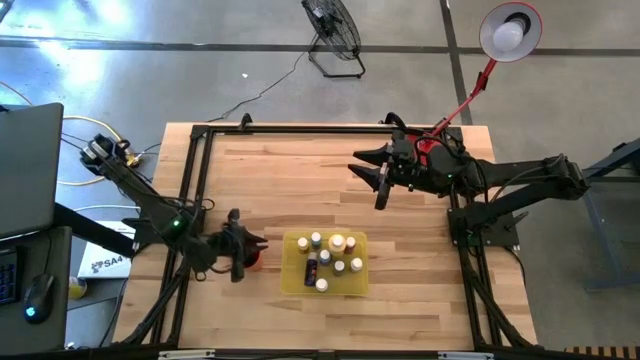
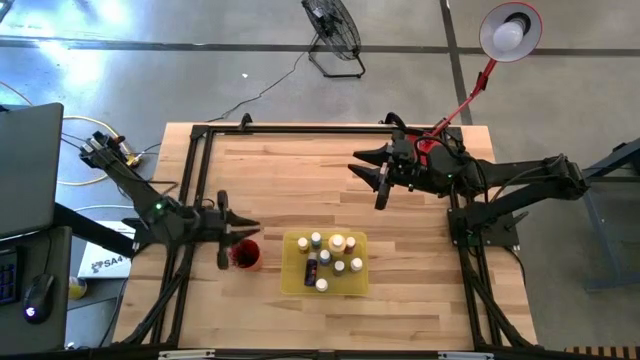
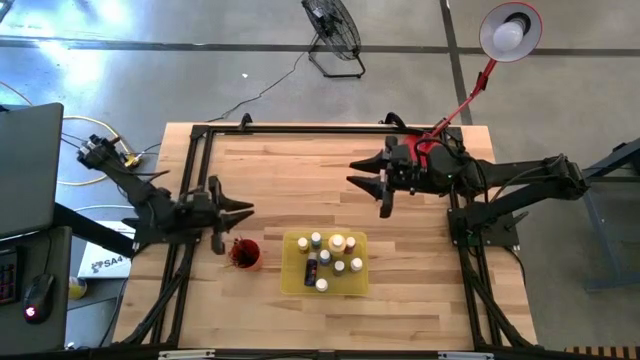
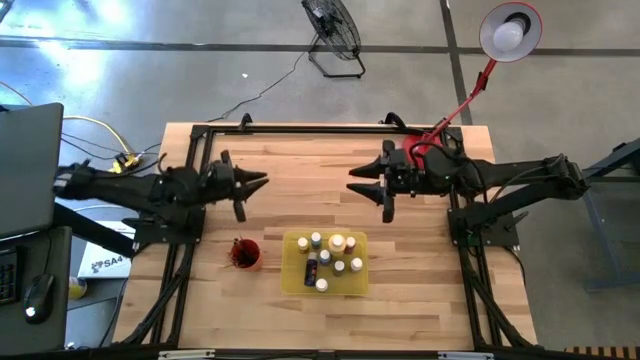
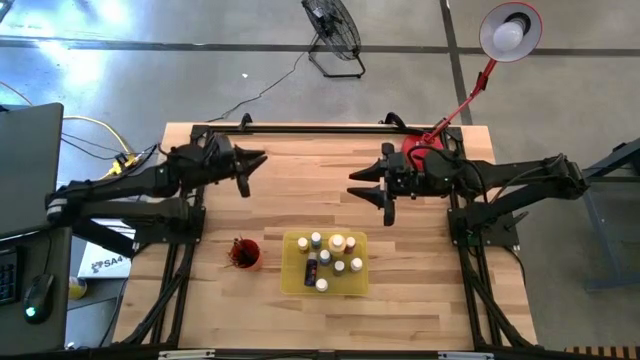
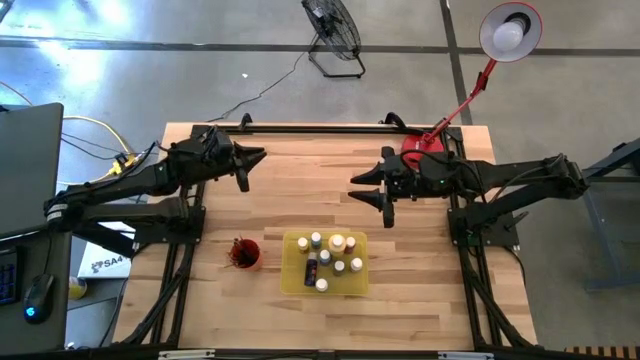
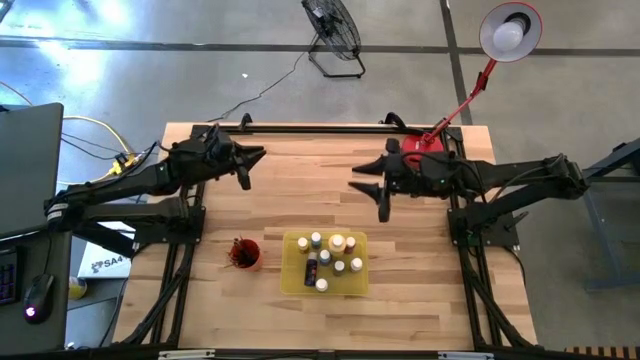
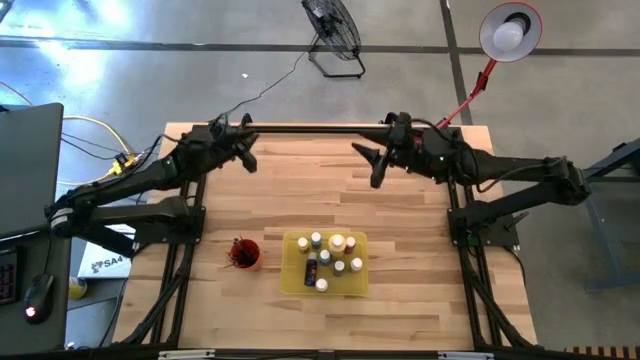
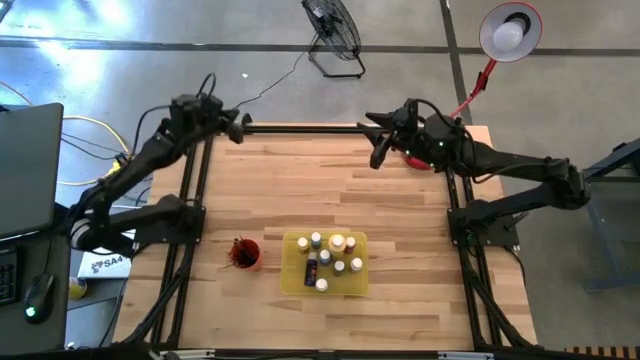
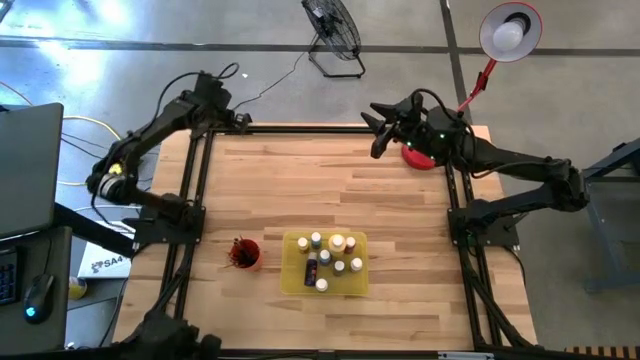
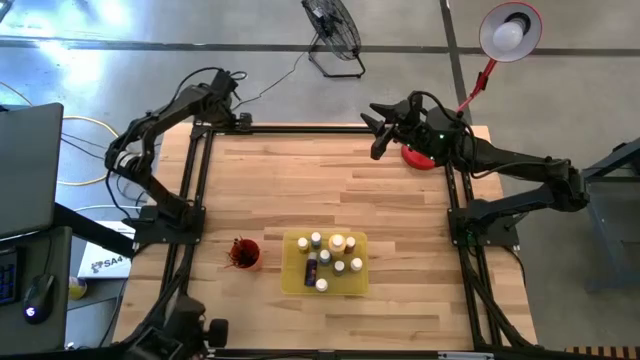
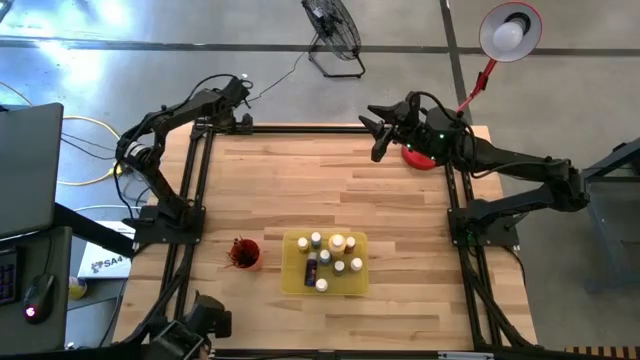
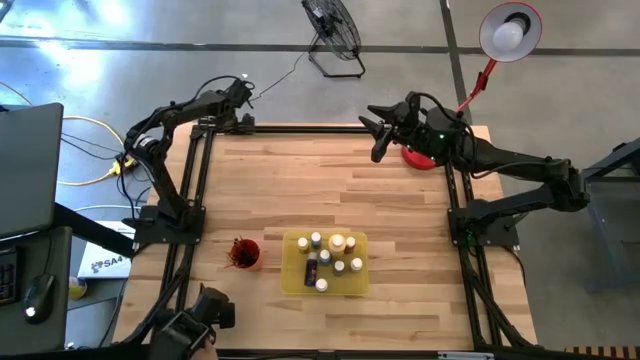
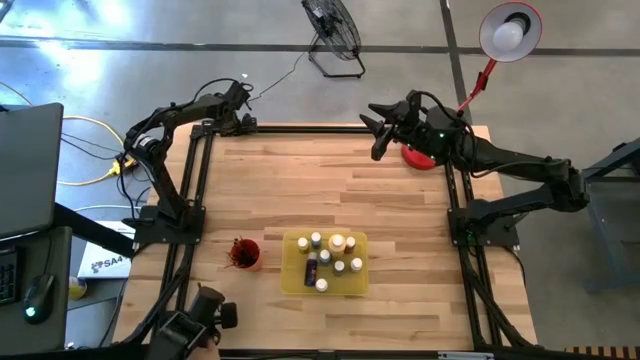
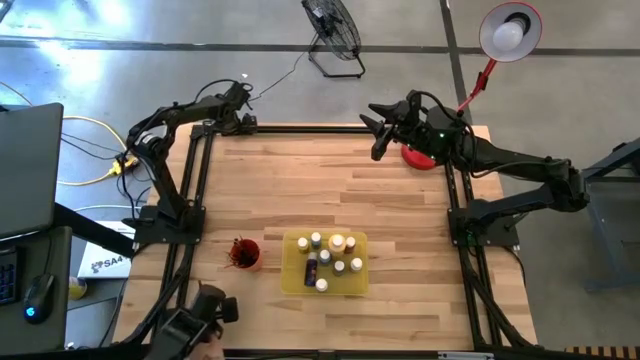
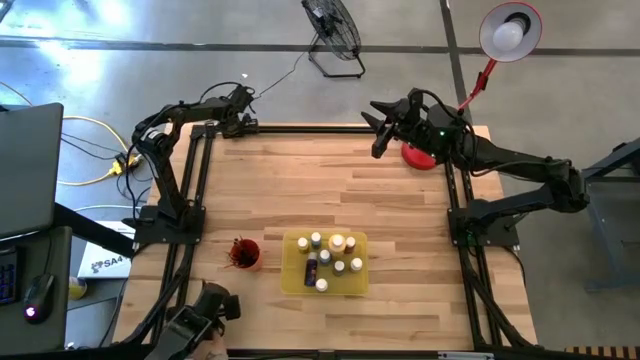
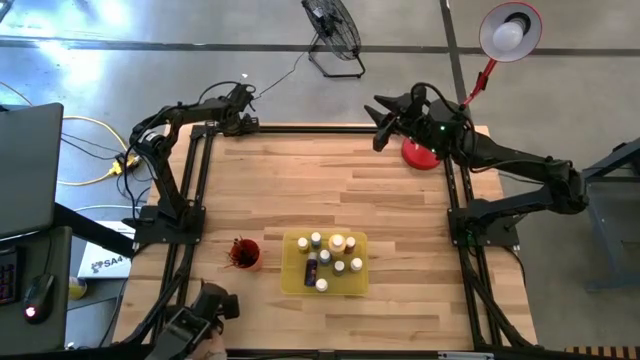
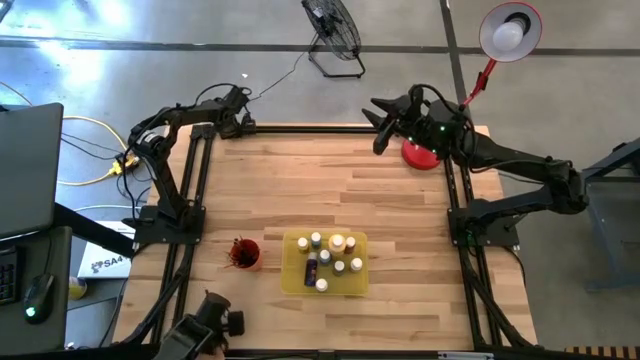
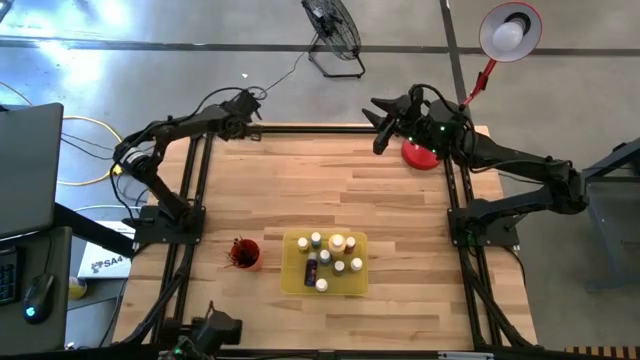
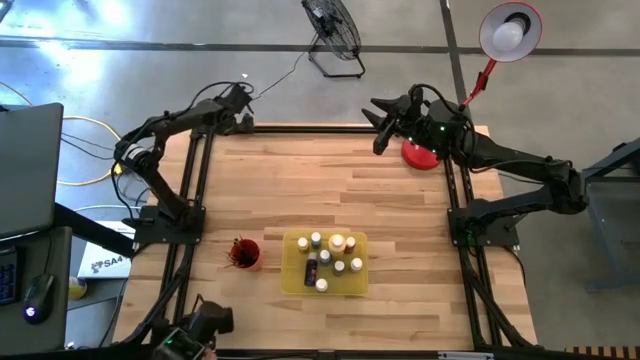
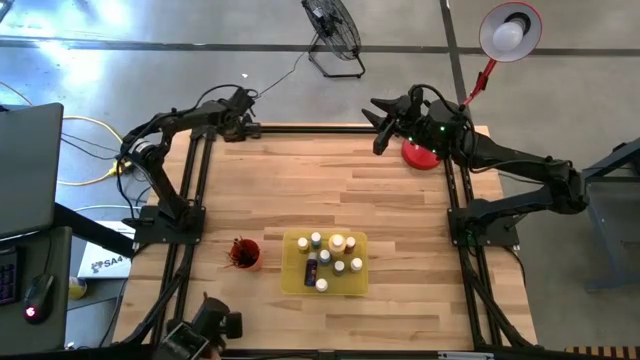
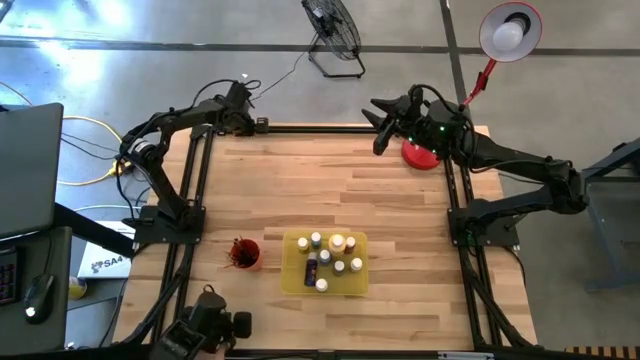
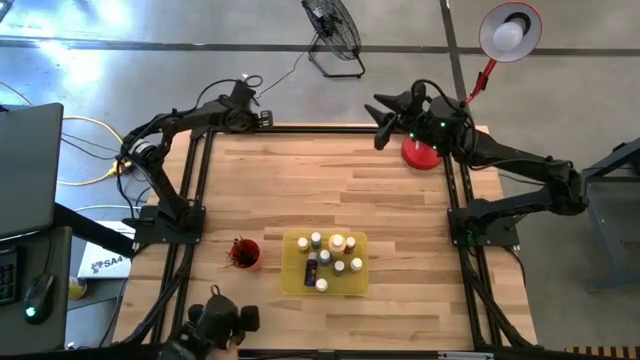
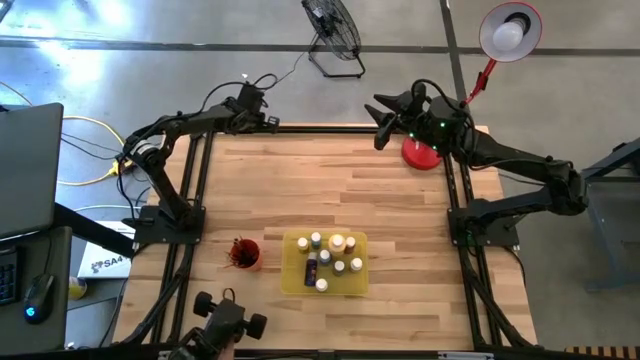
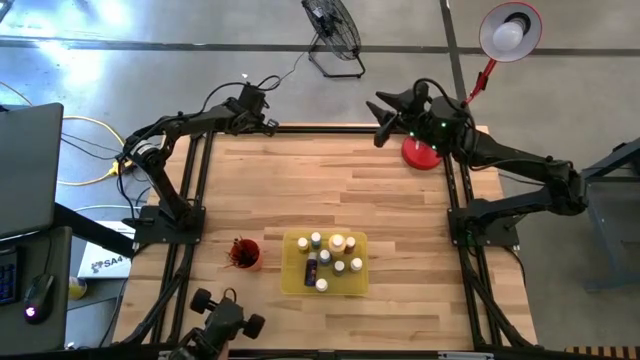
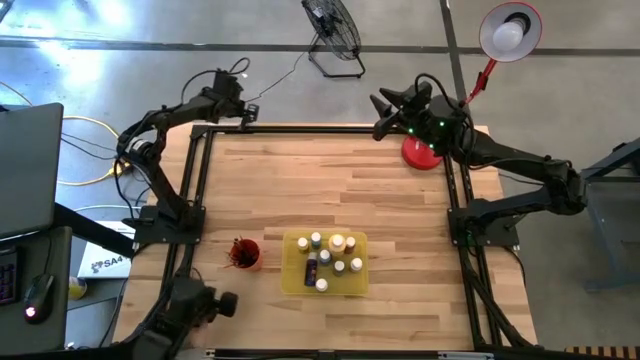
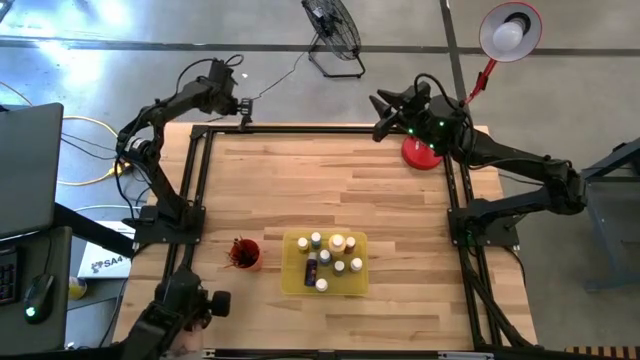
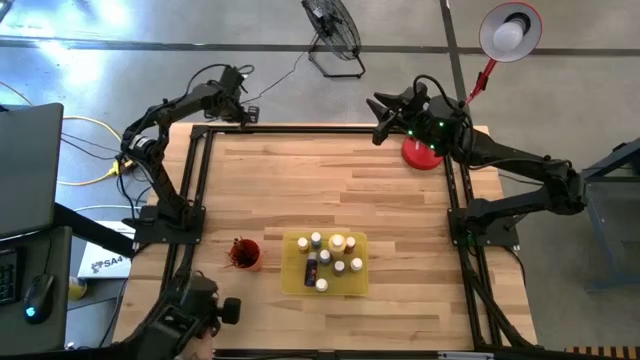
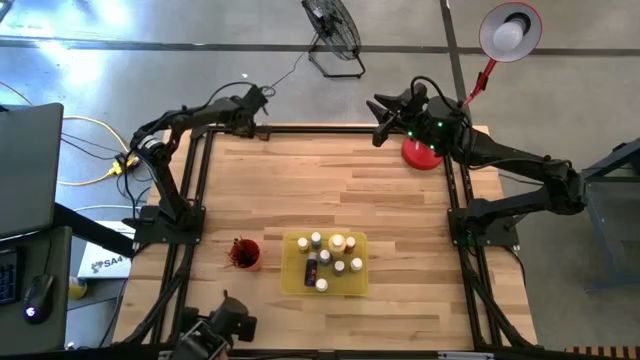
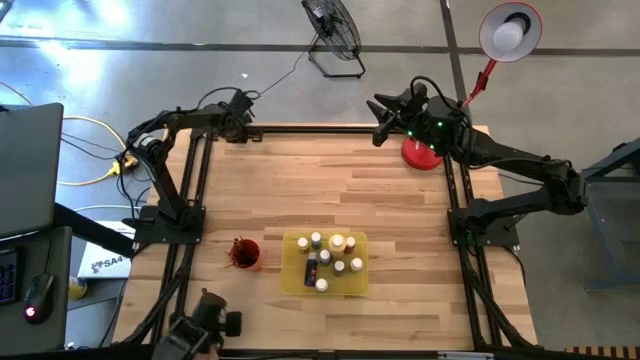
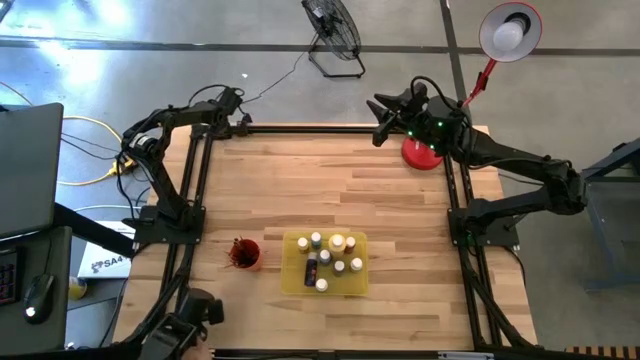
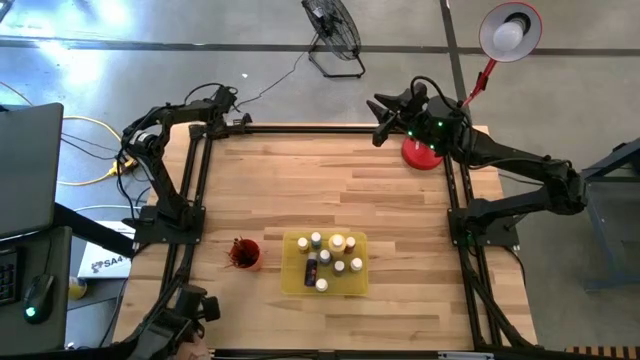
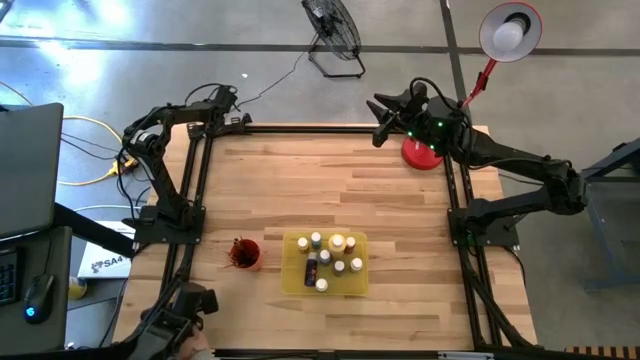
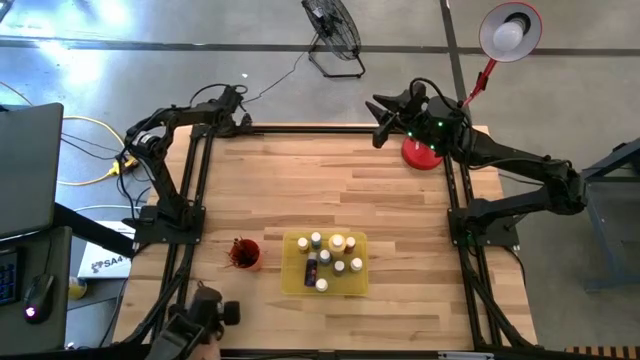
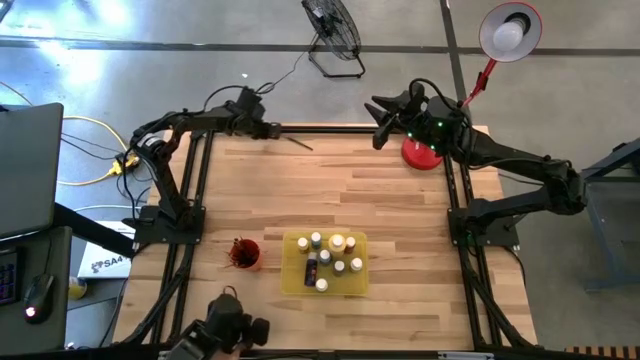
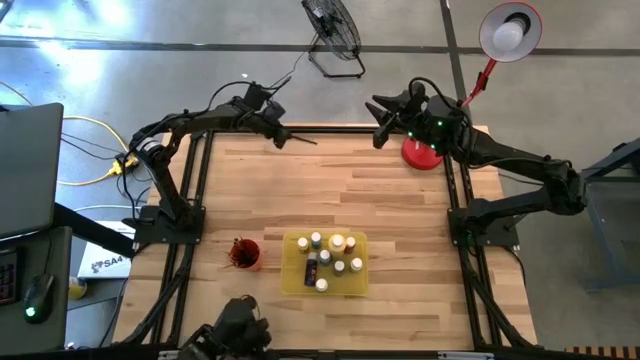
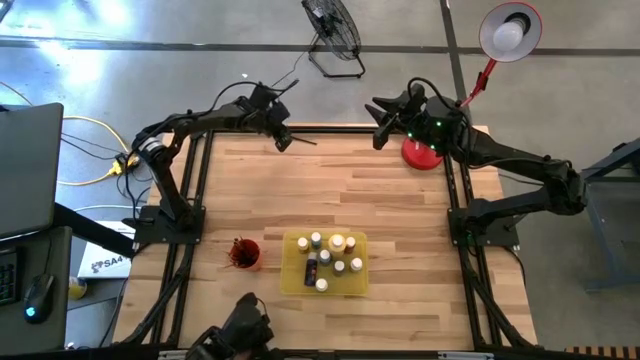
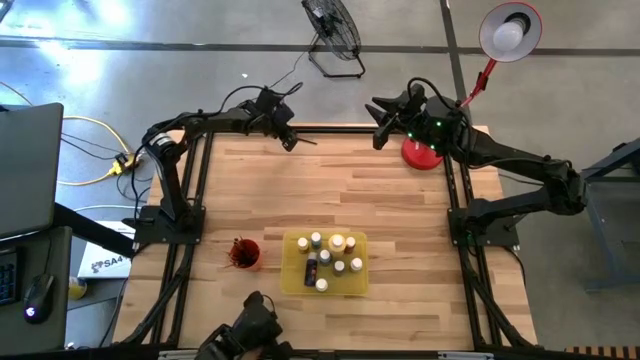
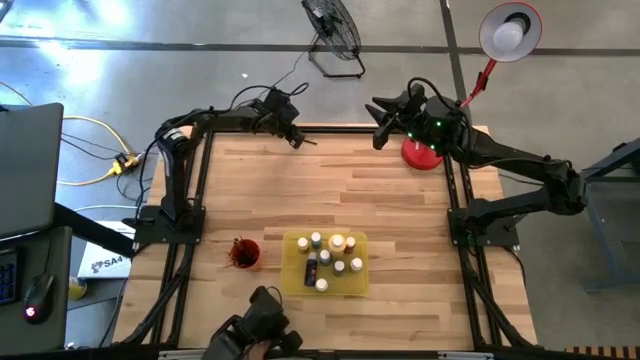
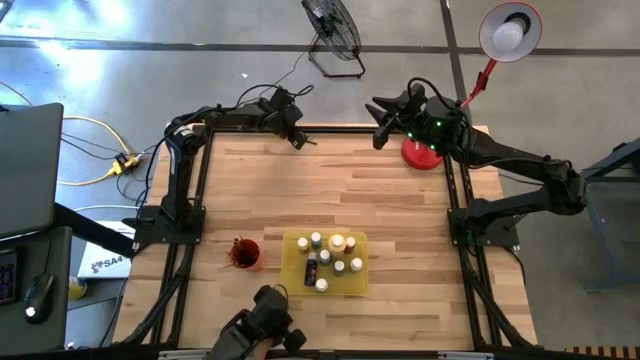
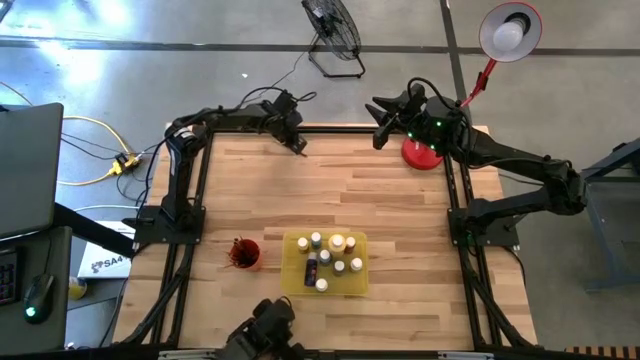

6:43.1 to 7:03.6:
Task: Pick & Place Paint Supplies
Put the silver paint brush into the orange cup
